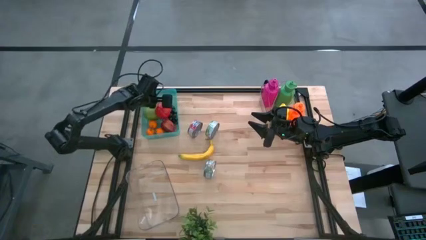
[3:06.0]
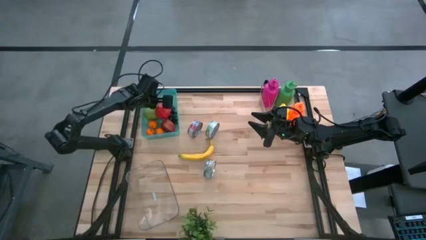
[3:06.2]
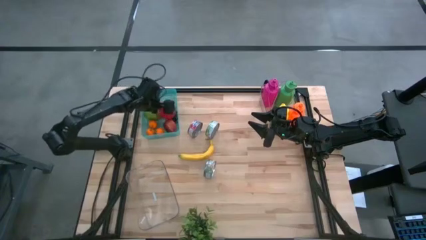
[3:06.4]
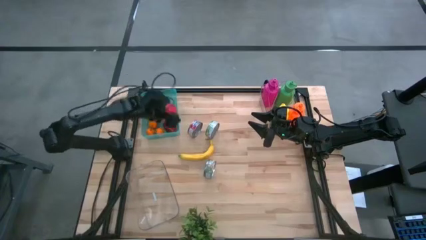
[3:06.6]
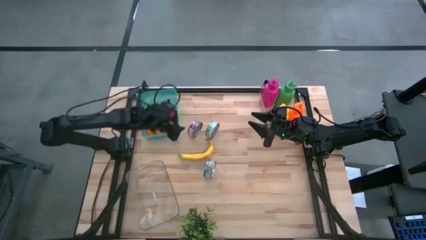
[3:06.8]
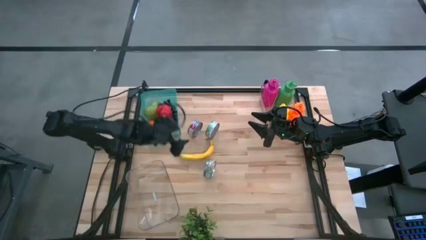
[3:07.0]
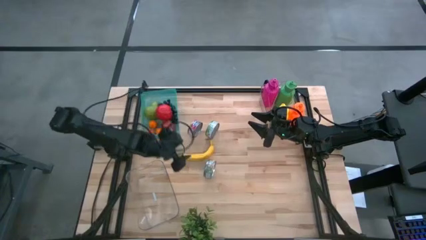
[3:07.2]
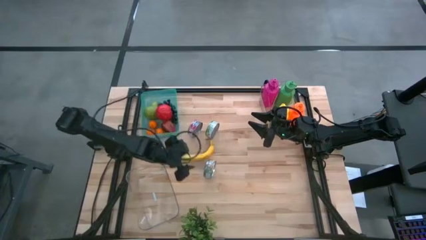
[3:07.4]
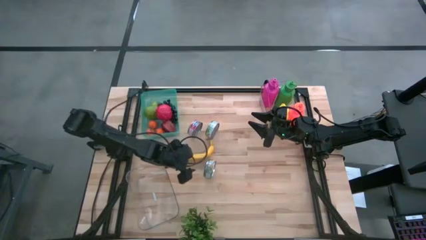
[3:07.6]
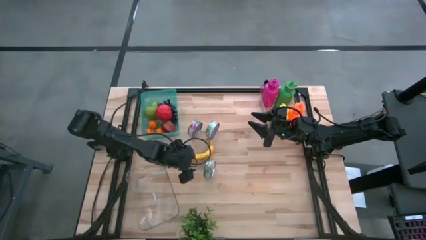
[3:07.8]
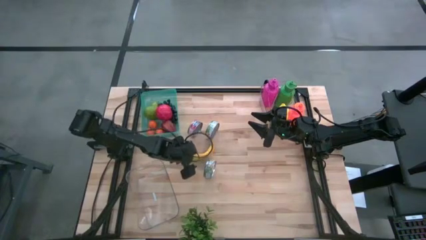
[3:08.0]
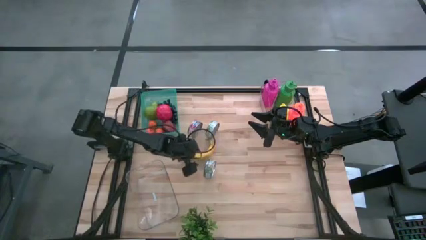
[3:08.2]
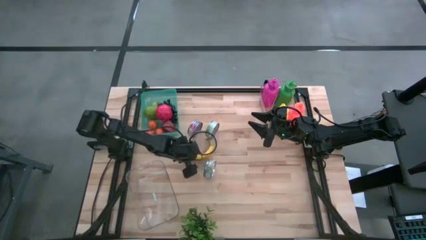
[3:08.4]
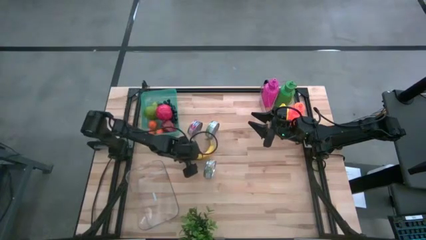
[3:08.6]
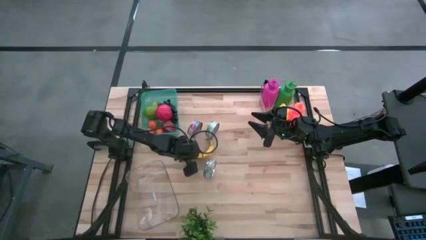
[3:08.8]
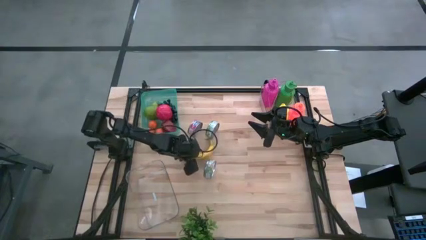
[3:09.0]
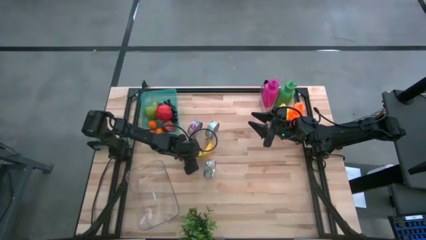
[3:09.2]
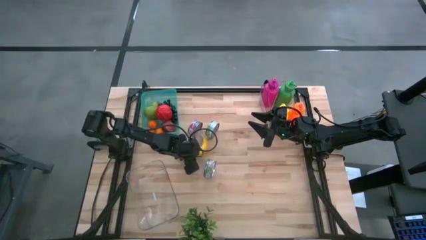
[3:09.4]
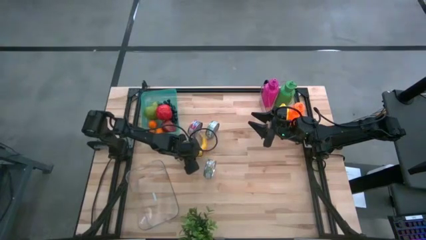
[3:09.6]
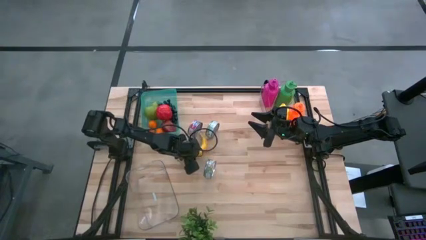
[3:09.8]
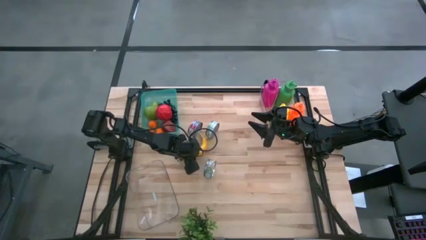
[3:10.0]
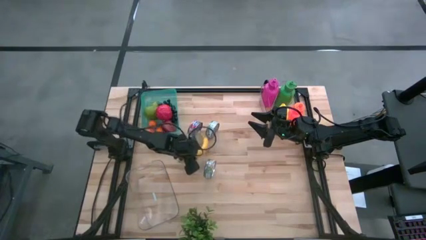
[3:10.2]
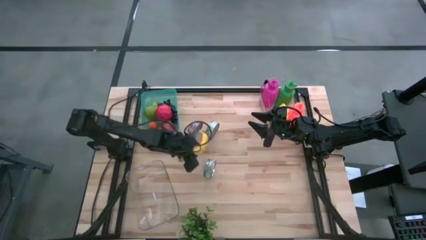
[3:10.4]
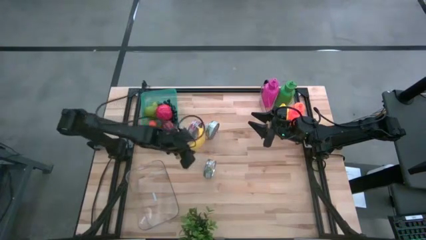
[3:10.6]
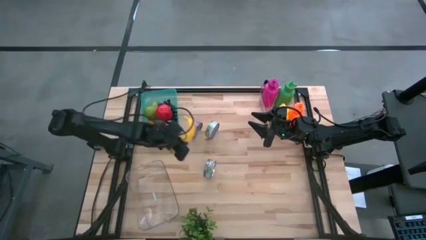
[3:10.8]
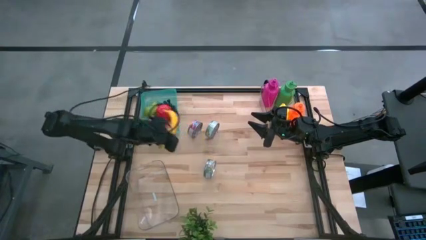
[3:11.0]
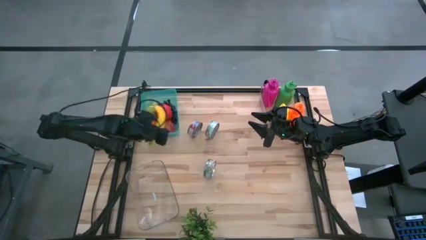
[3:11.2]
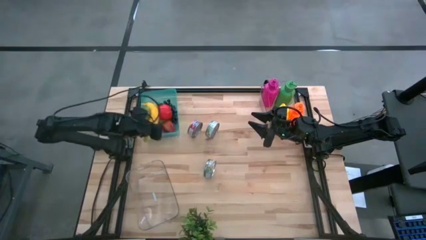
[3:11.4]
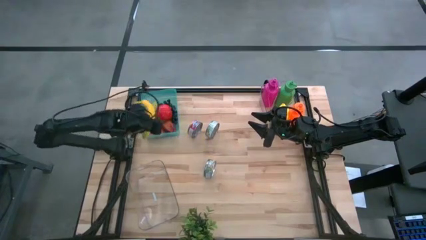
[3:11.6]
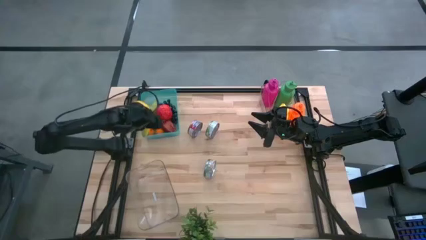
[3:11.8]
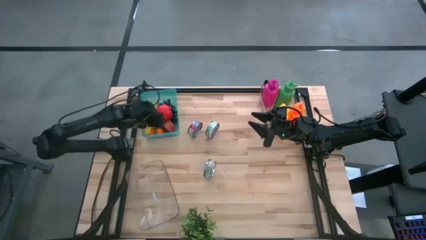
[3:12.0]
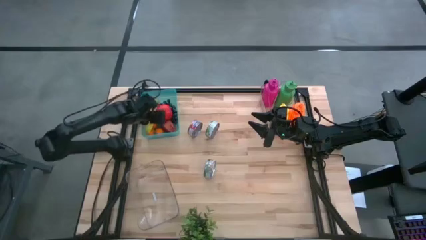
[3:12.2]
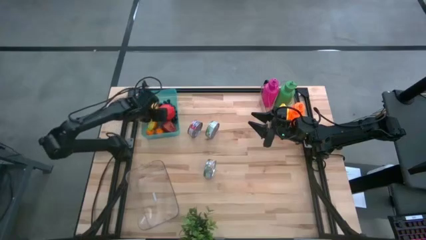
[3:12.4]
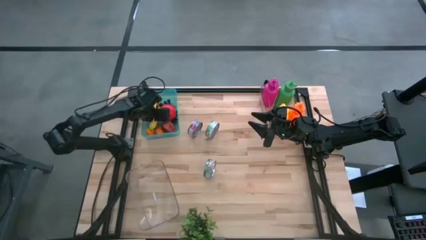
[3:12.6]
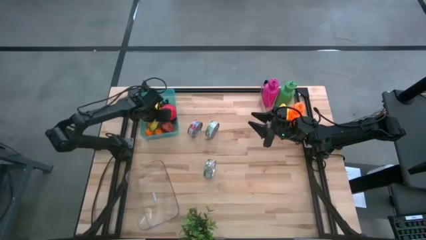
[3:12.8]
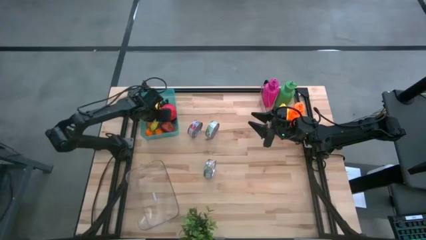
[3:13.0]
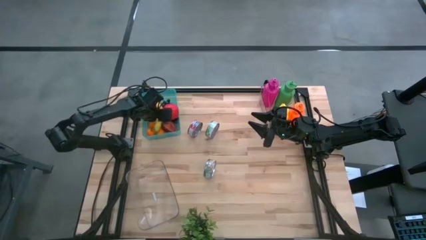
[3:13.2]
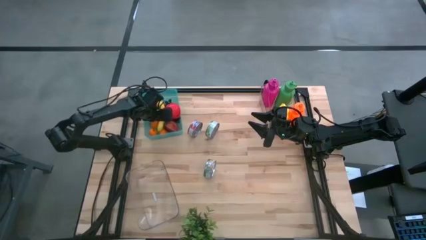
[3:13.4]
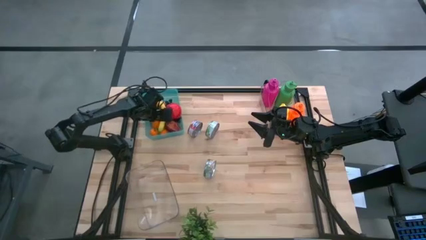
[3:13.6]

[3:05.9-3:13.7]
Task: Pick & Place Food Item
Put the yellow banana into the green bin

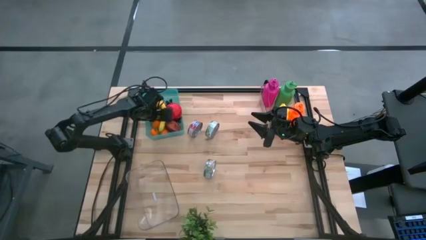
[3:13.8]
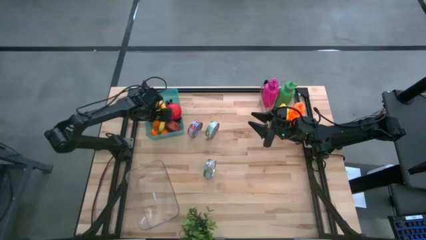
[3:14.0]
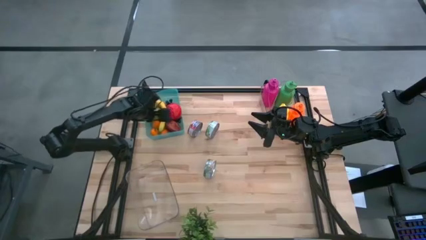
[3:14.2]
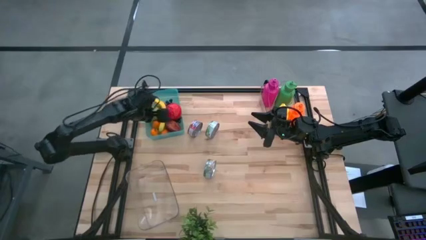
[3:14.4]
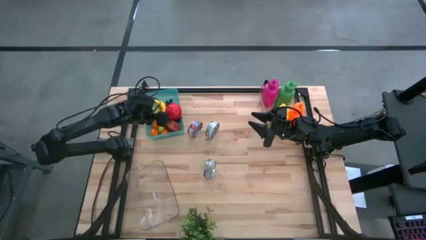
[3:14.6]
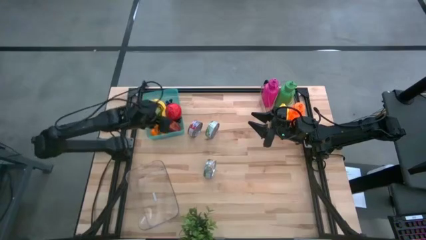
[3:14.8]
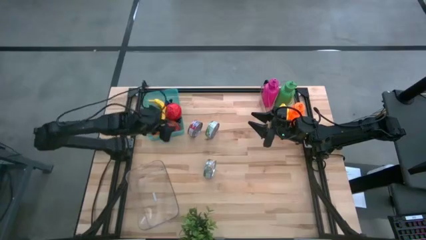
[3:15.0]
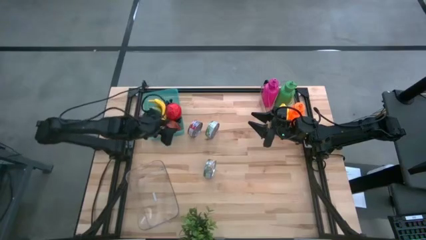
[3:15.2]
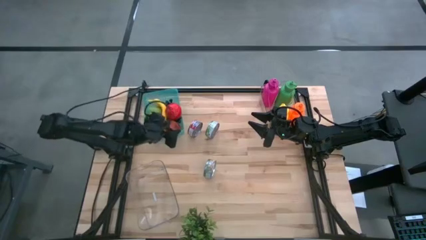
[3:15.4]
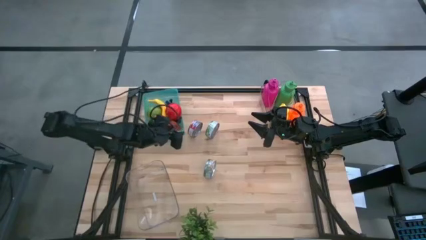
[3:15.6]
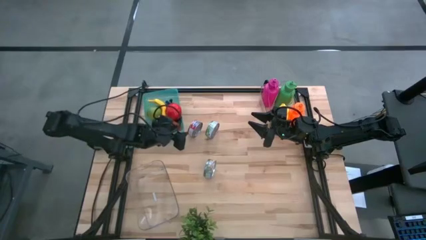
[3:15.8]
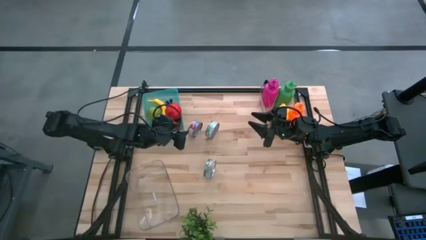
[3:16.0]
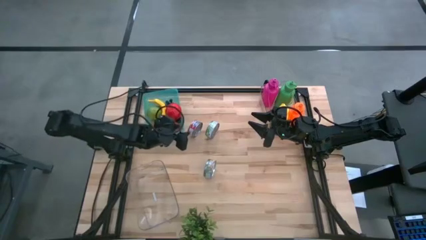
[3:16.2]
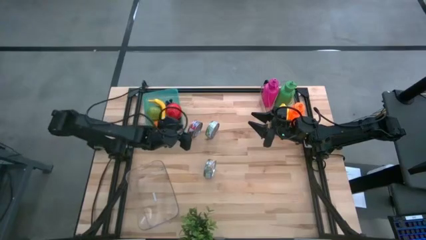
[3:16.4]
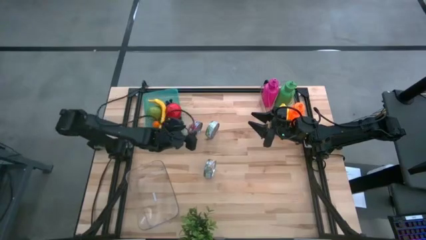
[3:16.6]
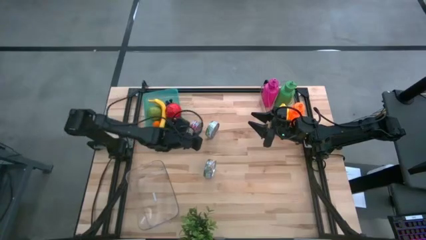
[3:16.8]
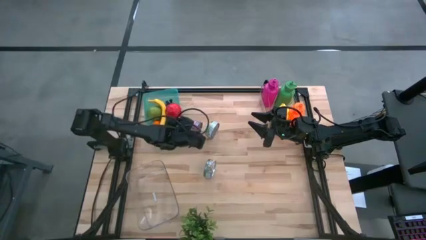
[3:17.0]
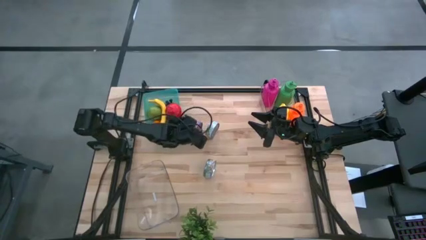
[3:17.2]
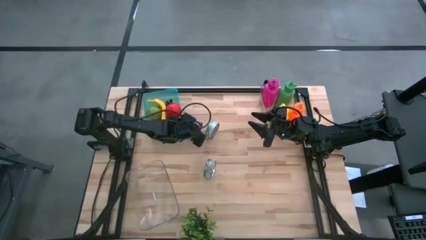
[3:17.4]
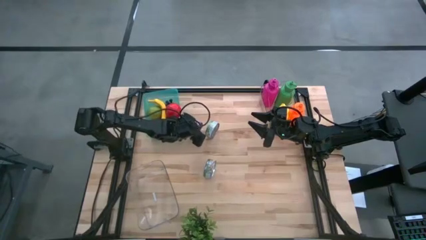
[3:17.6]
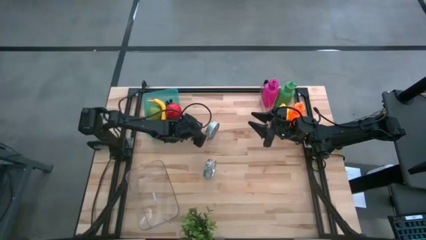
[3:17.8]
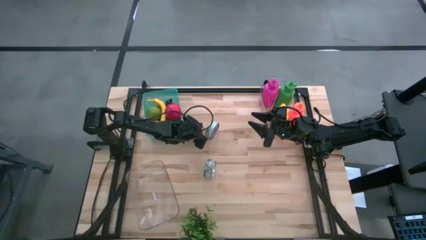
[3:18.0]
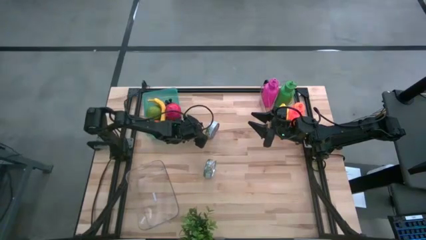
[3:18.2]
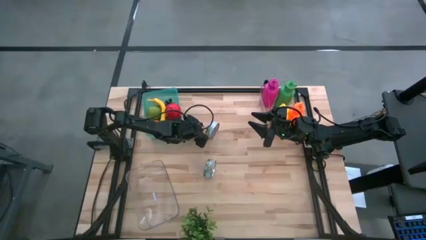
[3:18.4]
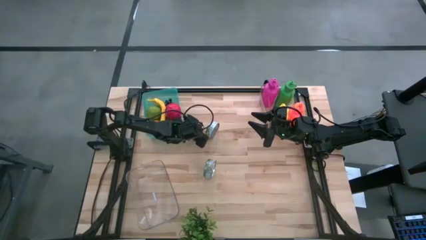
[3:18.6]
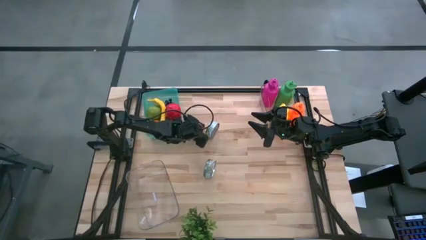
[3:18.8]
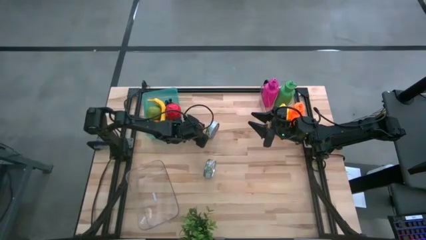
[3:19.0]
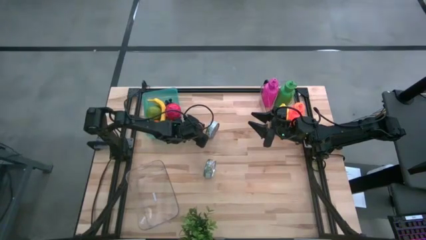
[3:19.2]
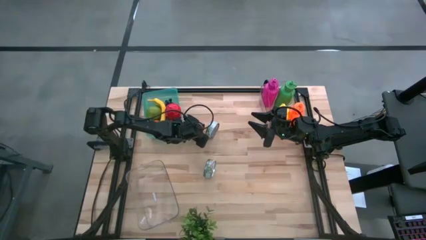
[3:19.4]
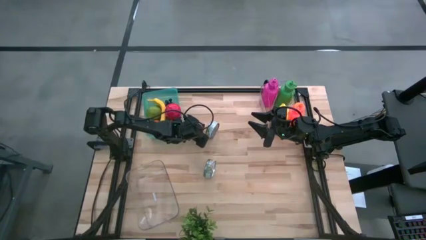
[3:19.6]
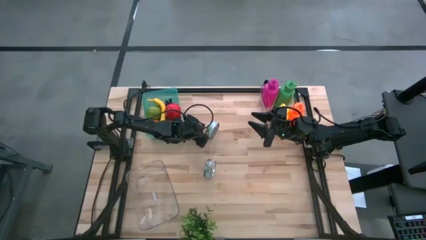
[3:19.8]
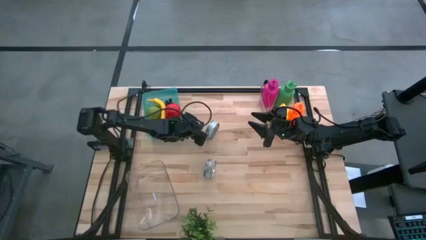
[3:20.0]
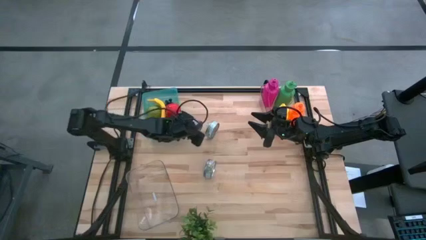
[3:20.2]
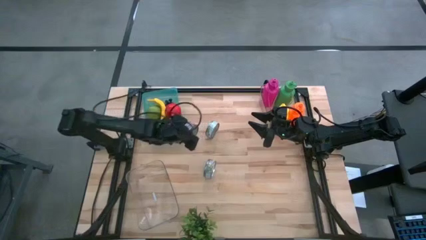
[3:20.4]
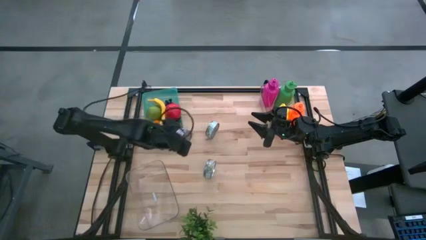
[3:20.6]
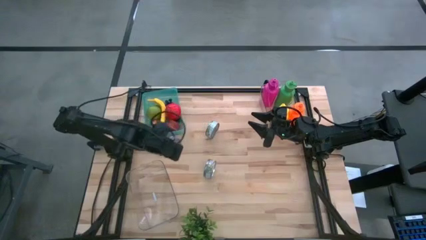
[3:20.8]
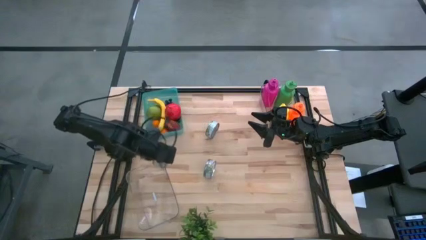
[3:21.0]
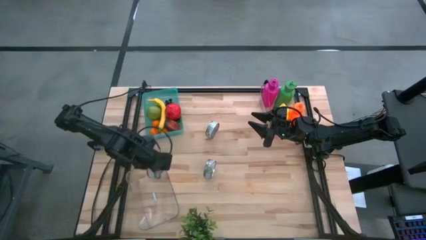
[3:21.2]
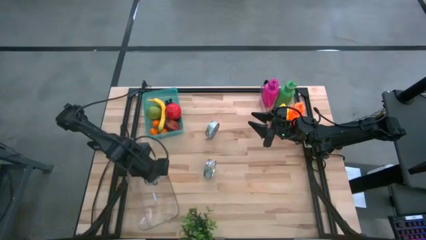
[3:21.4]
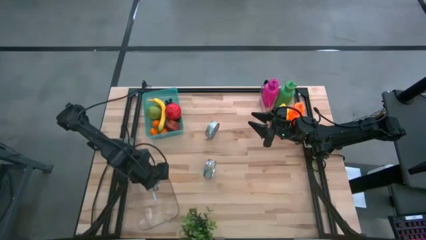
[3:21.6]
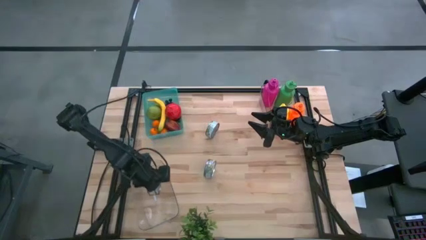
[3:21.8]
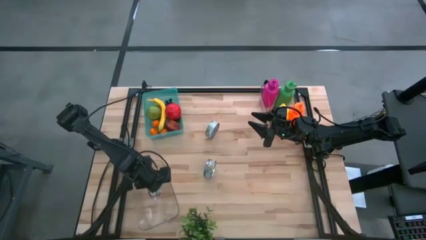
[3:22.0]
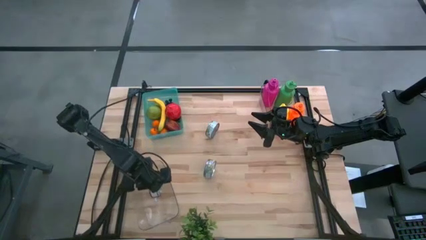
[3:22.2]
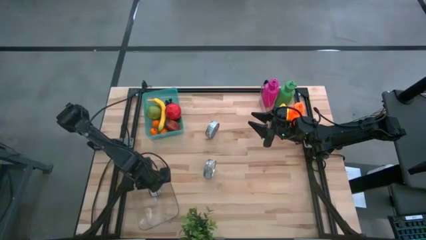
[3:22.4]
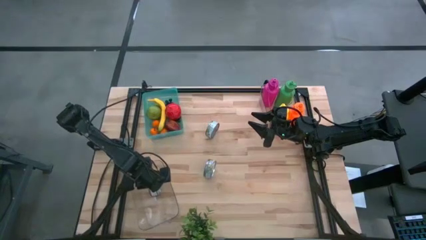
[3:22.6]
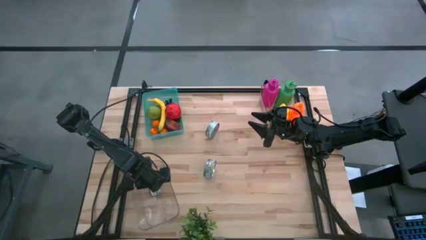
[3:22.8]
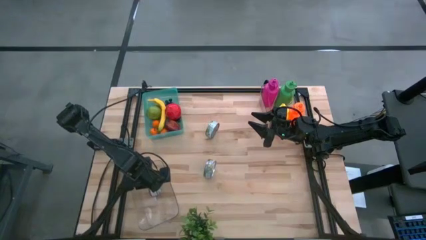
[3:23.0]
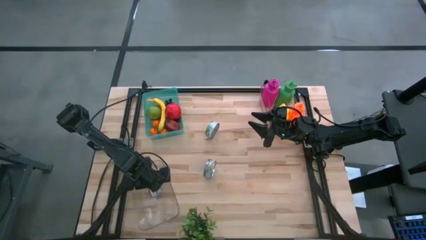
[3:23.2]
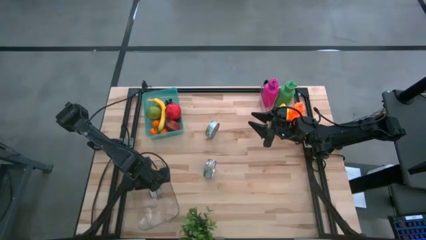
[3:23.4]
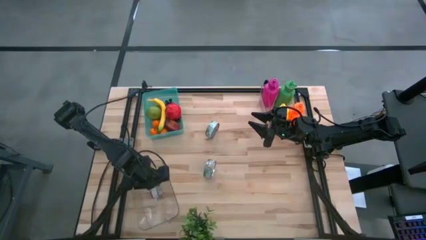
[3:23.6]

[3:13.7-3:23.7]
Put the red tuna can into the left transparent bin
